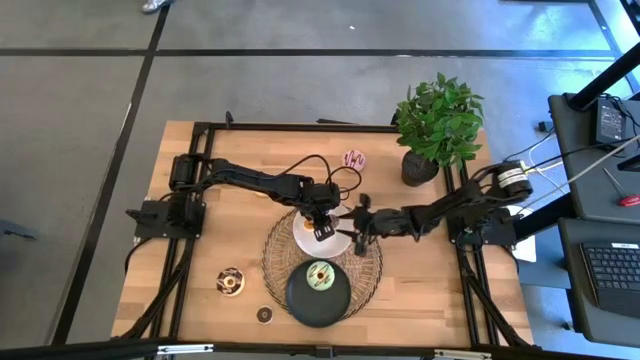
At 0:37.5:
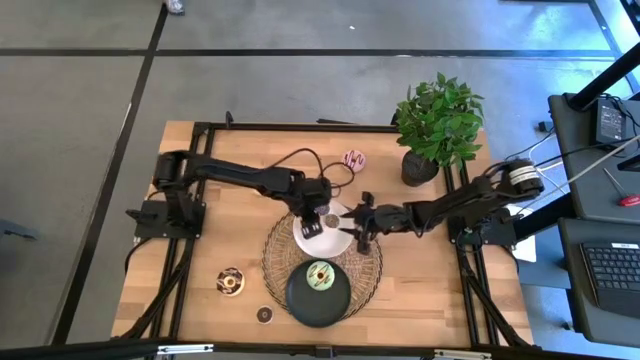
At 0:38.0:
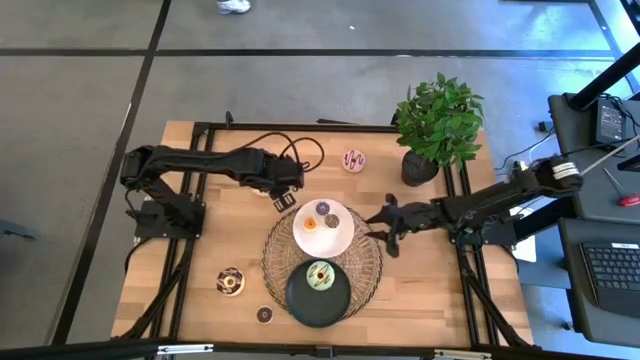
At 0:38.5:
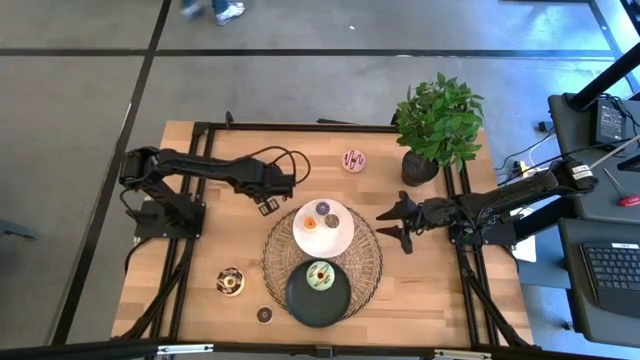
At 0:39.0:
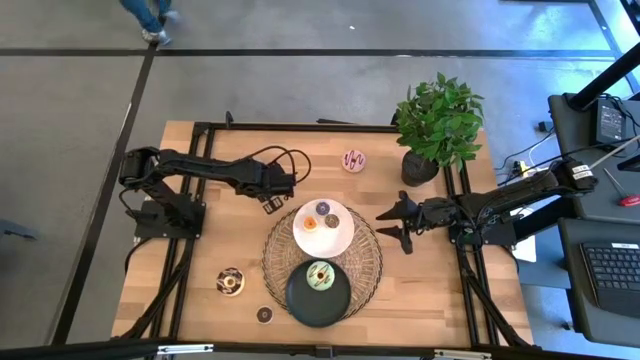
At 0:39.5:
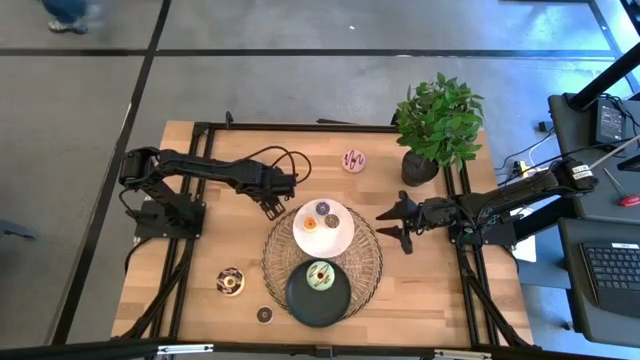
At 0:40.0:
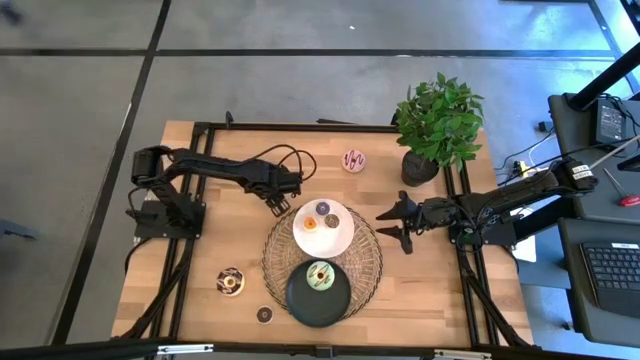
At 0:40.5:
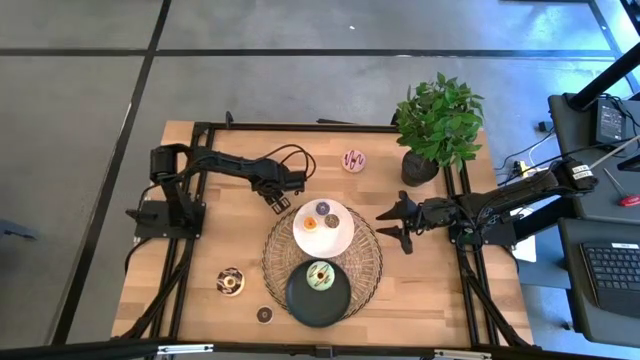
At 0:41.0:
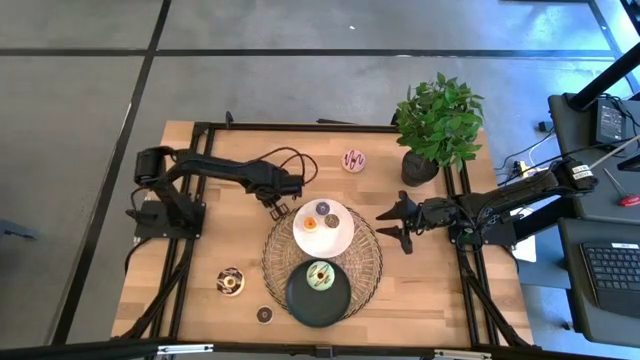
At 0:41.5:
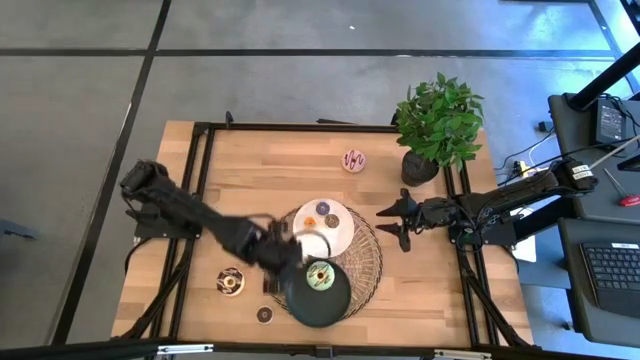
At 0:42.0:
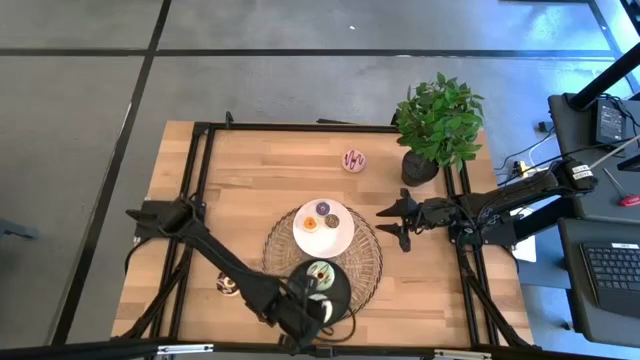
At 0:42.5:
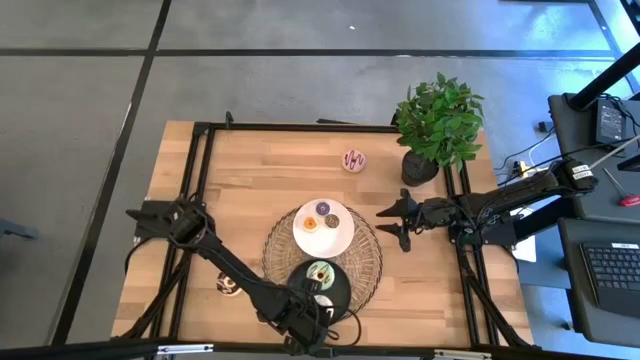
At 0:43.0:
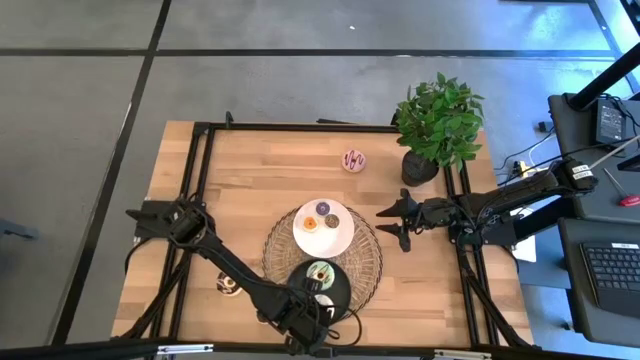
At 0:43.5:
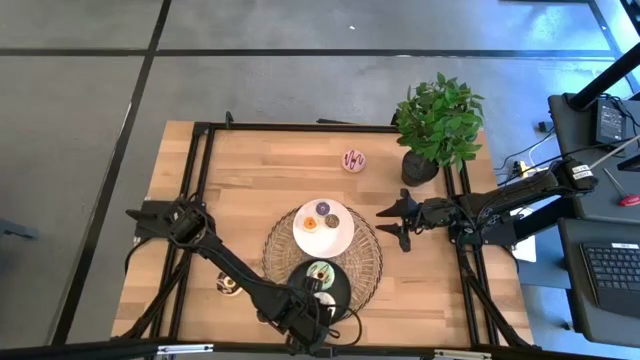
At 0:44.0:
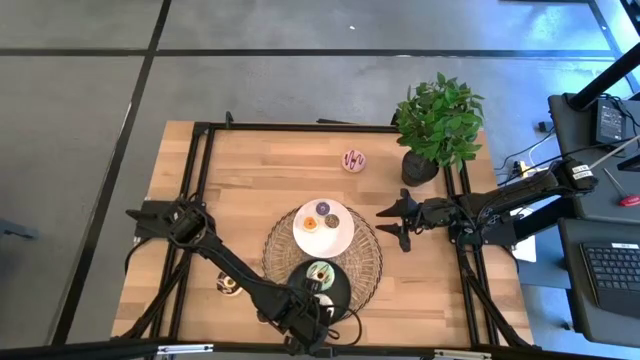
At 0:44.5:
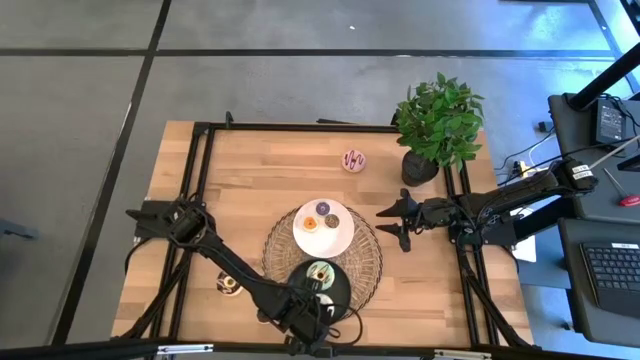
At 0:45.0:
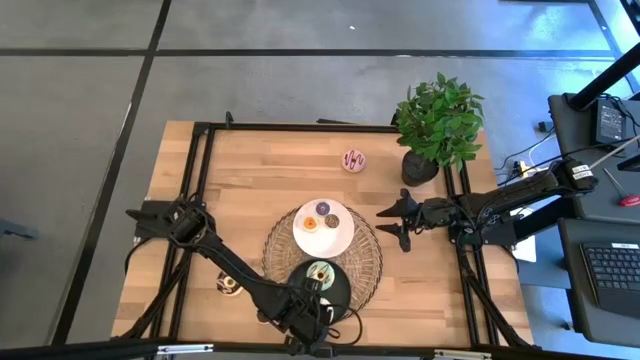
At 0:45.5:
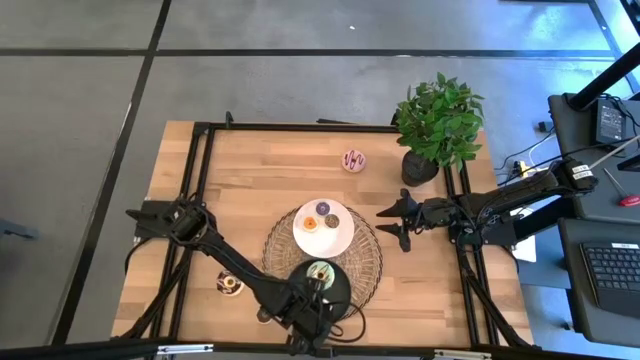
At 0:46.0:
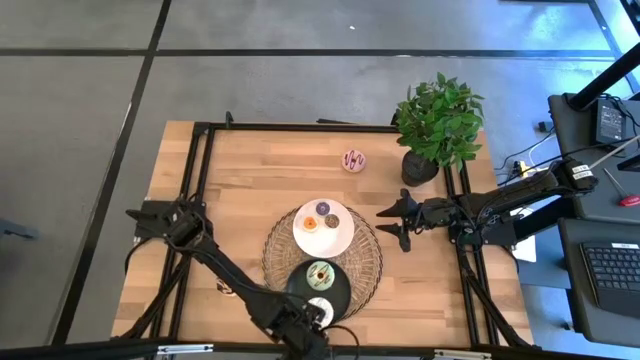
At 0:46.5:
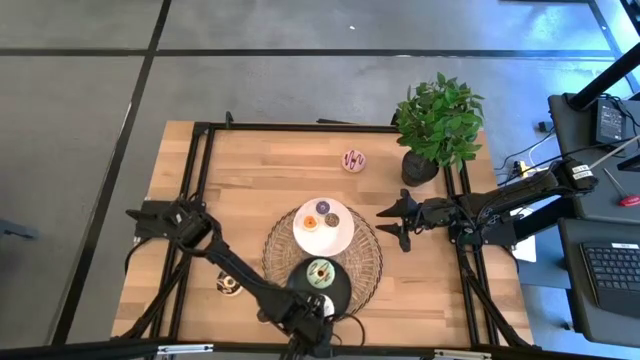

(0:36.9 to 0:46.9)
Task: Pick & Place donuts
Put the big white doughnut on the black plate

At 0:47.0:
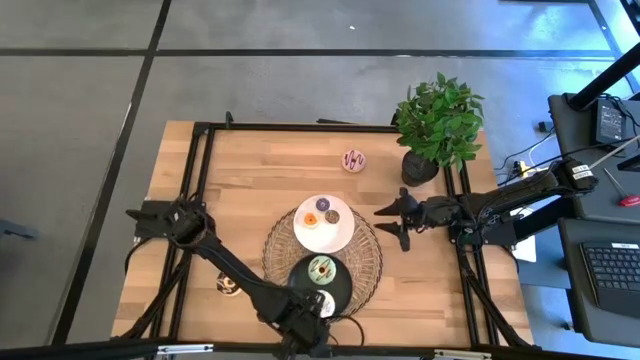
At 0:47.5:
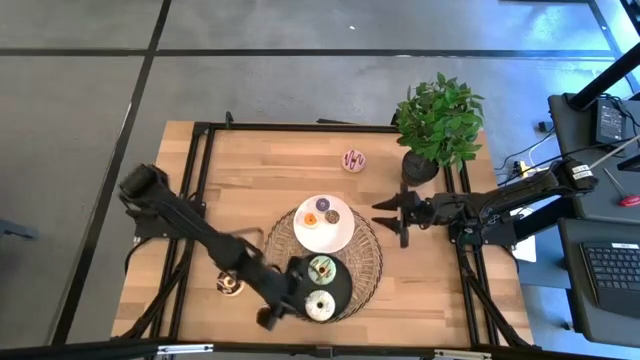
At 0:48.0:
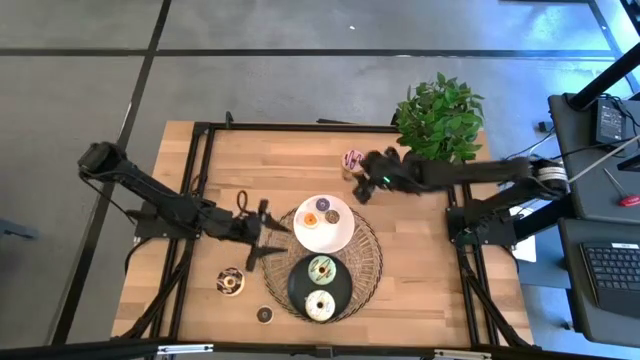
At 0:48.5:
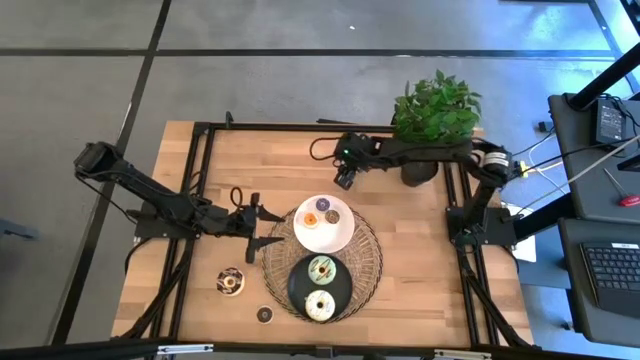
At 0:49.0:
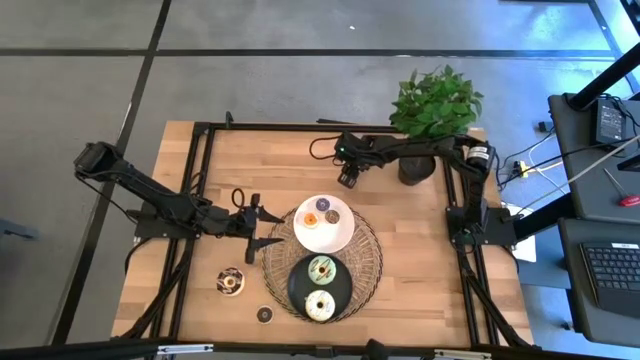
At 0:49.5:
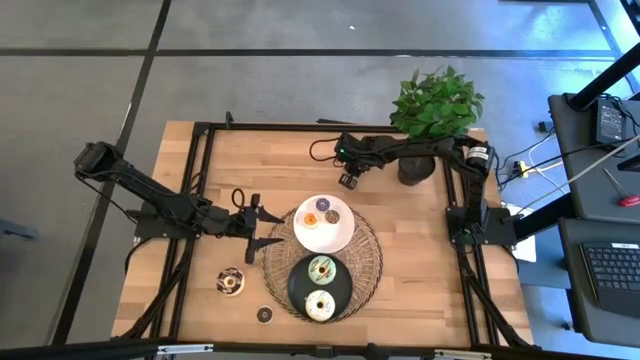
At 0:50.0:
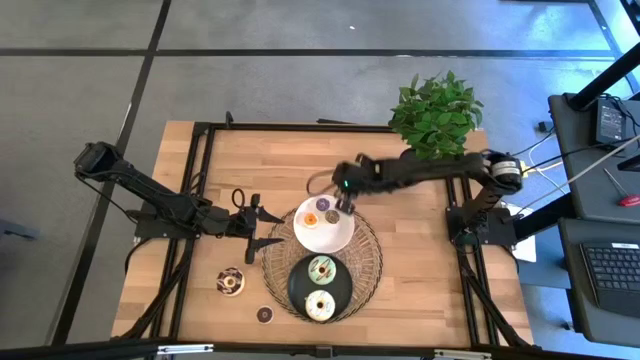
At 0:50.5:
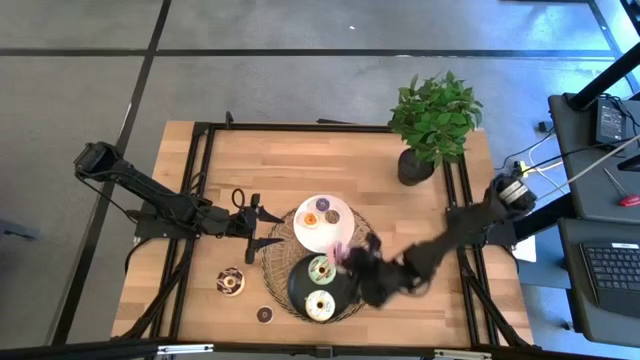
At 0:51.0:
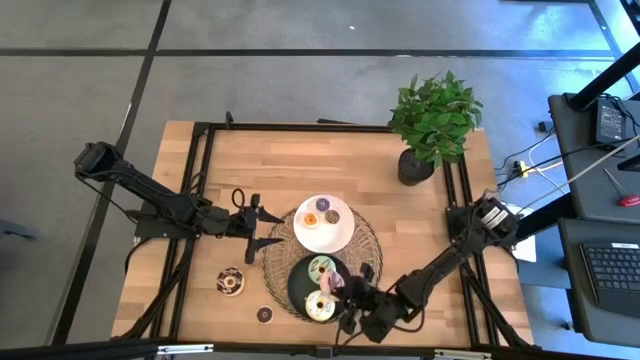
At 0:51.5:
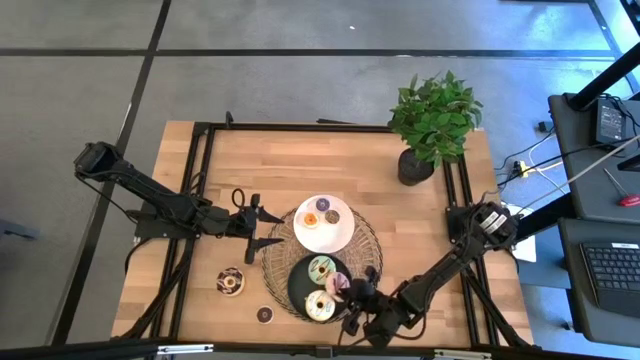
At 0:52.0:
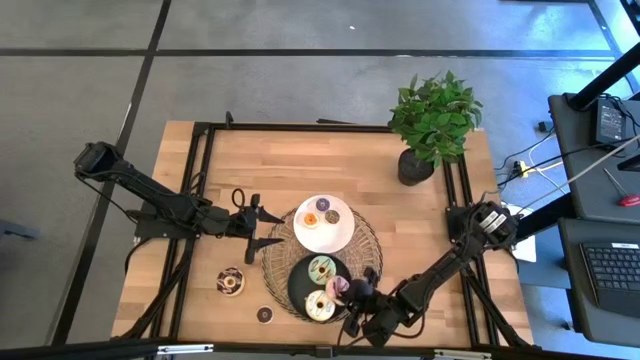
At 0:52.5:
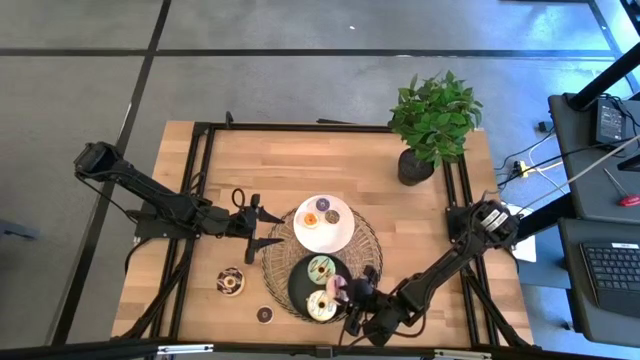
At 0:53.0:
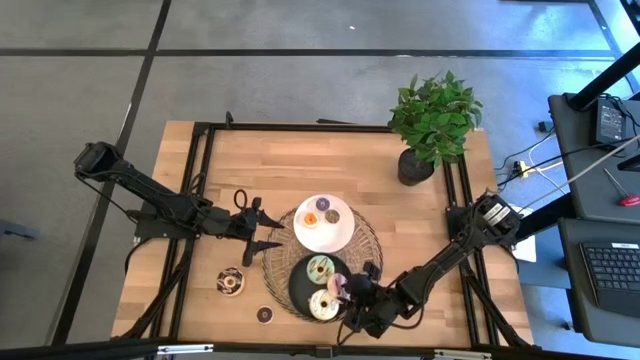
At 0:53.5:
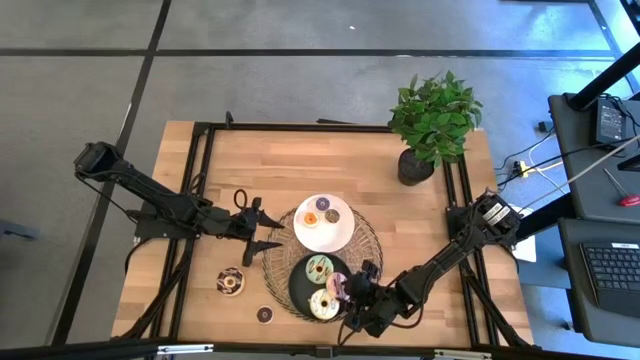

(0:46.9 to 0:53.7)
Put the big pink doughnut on the black plate

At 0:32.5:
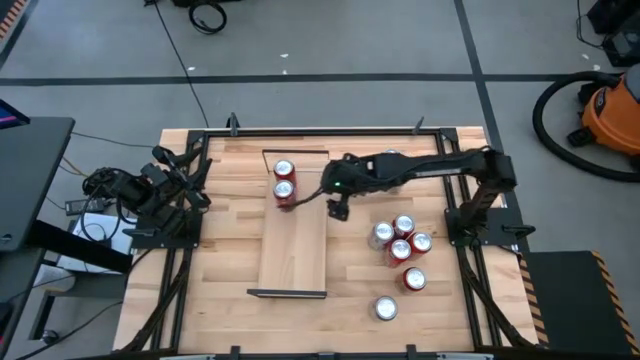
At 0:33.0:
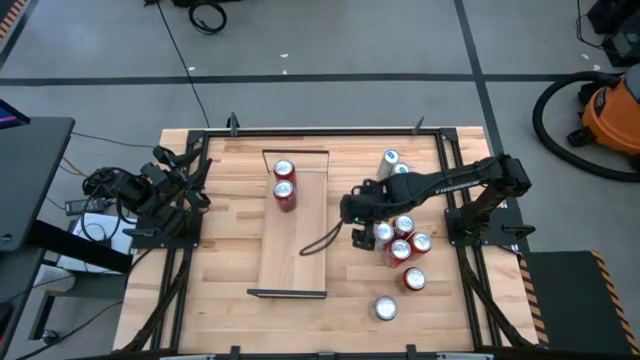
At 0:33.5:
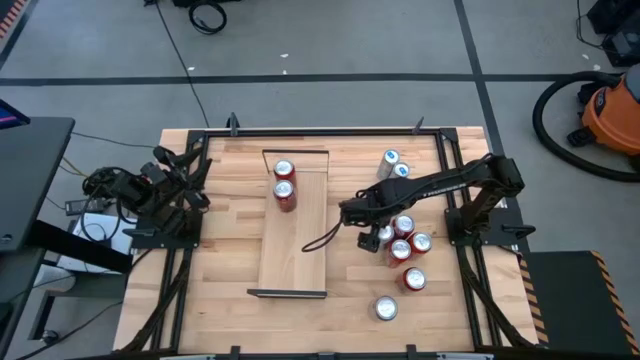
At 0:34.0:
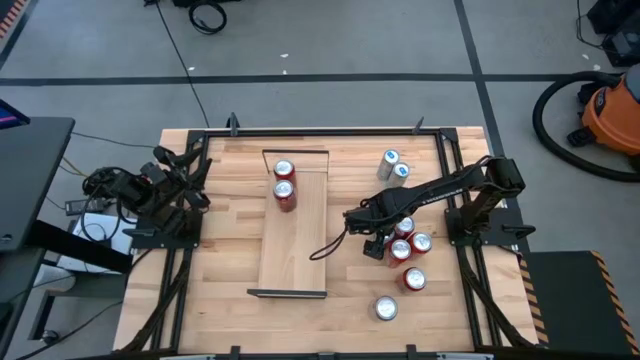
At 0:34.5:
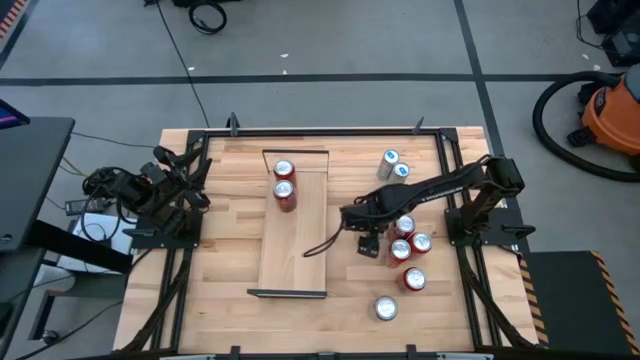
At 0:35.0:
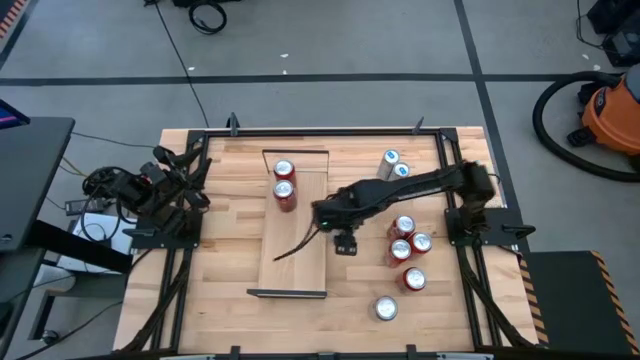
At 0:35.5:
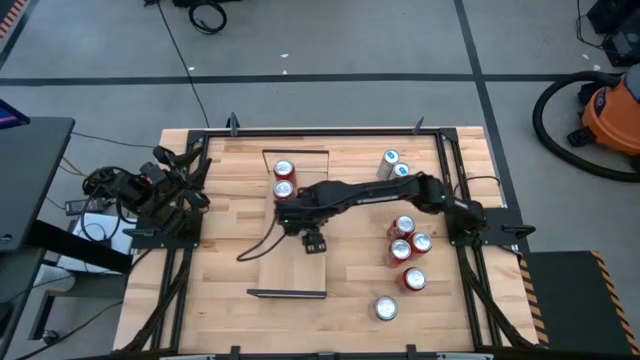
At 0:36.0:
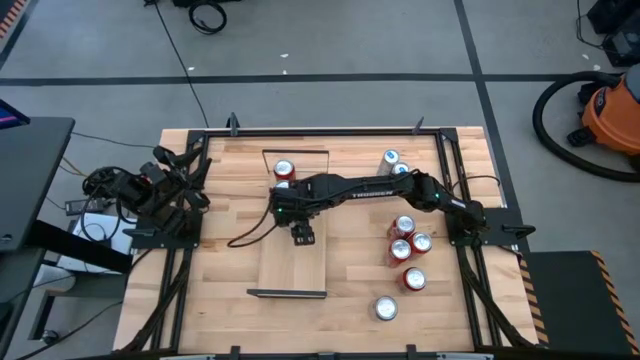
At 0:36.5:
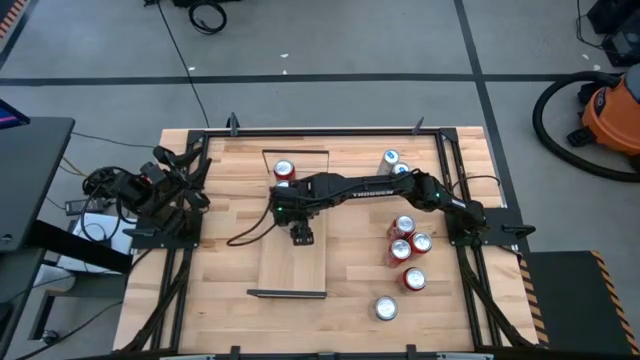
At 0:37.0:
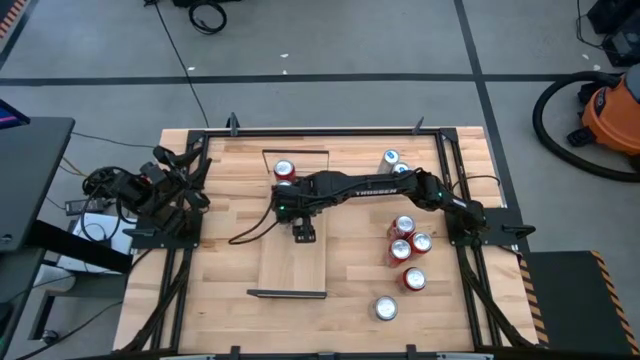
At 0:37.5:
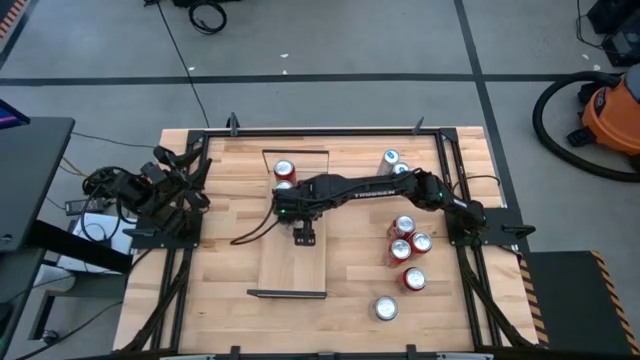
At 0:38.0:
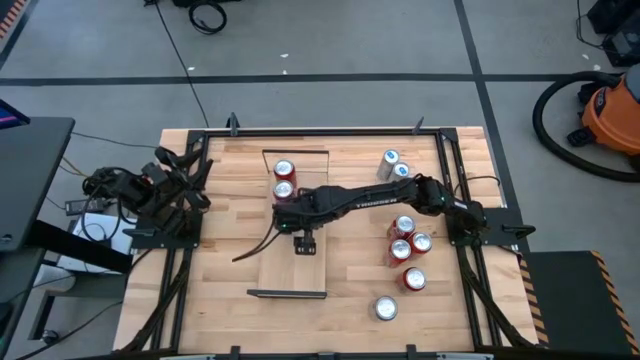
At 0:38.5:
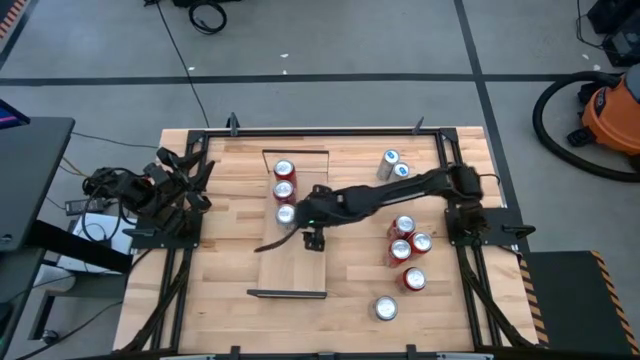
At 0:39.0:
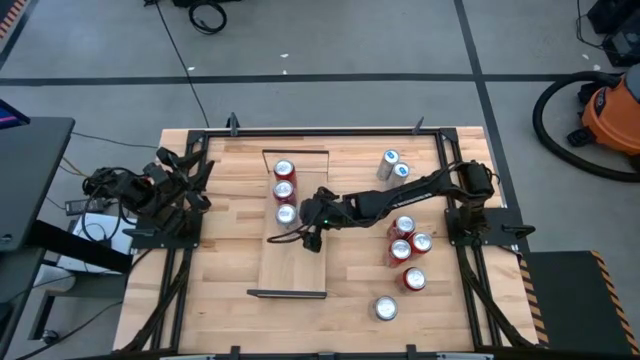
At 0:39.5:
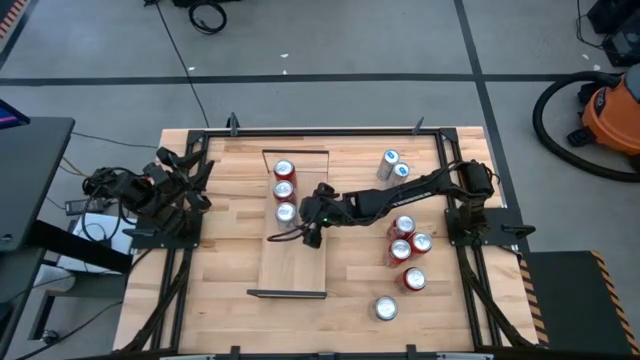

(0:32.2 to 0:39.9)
Task: Place canned beverage on shelf
Put the top silver soda can on the shelf
